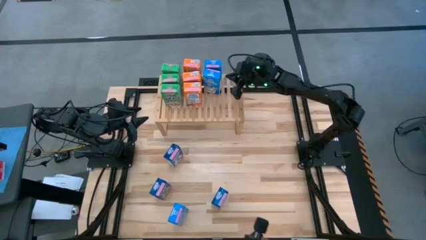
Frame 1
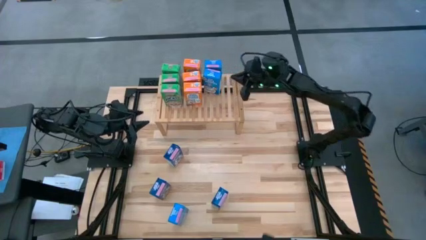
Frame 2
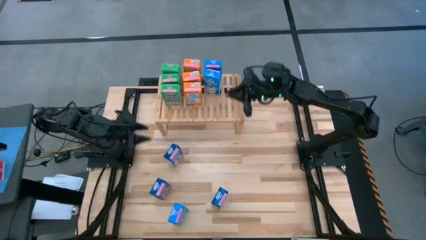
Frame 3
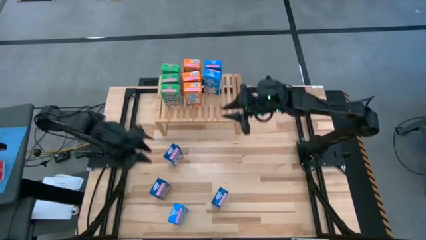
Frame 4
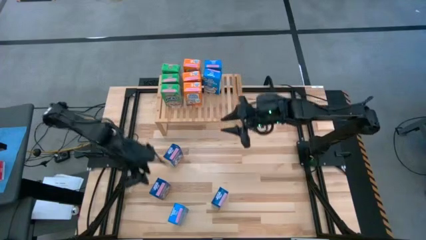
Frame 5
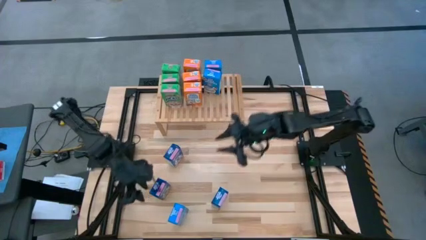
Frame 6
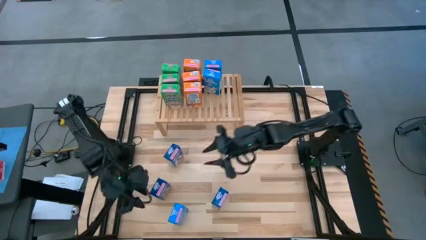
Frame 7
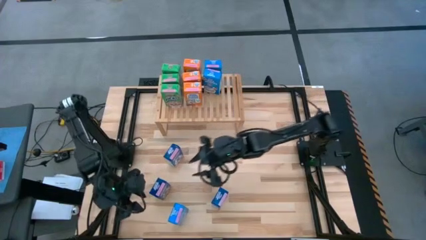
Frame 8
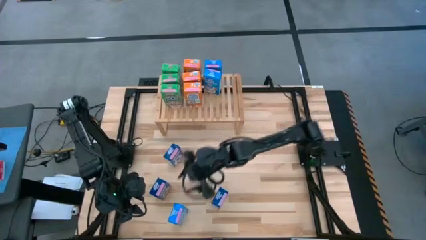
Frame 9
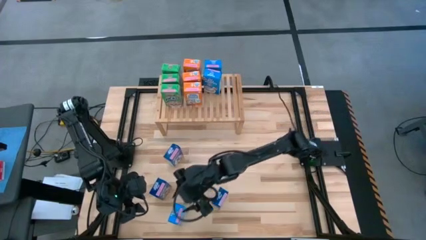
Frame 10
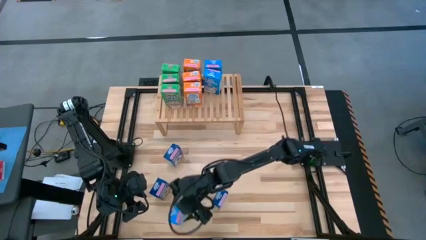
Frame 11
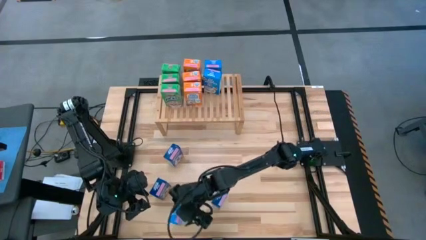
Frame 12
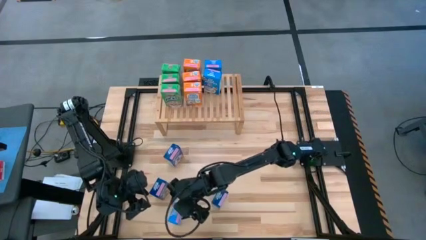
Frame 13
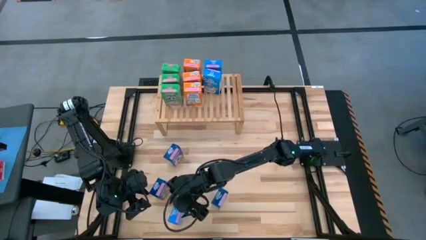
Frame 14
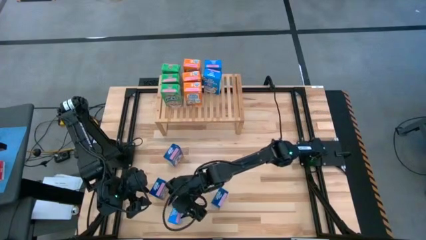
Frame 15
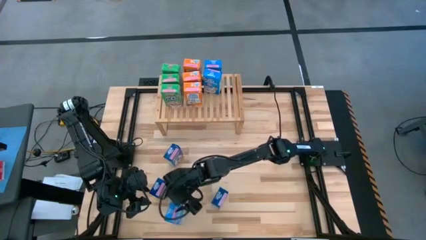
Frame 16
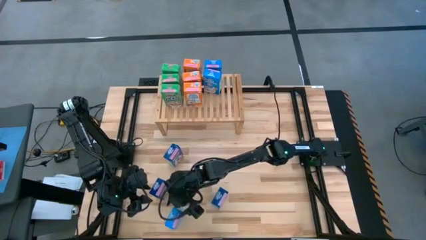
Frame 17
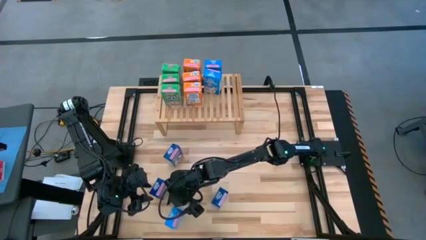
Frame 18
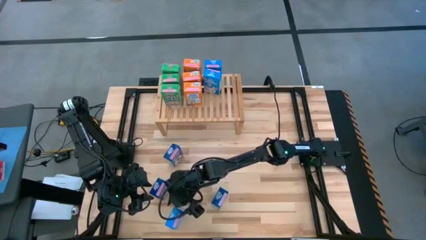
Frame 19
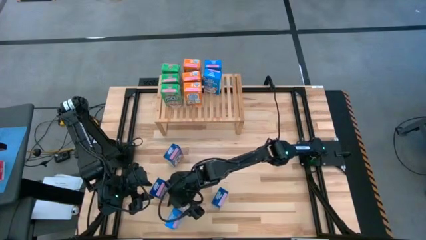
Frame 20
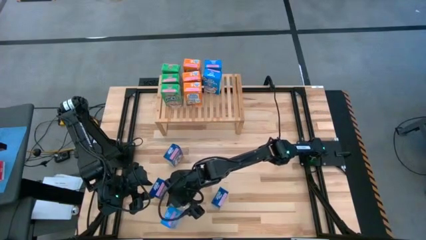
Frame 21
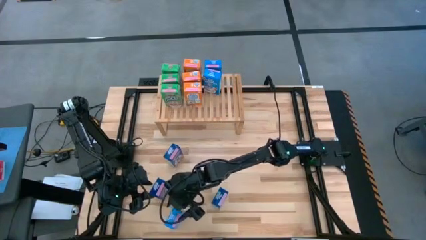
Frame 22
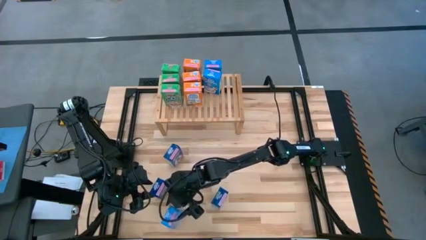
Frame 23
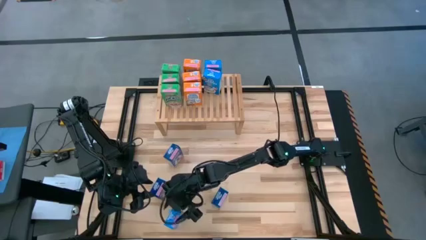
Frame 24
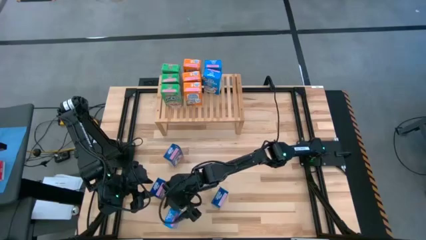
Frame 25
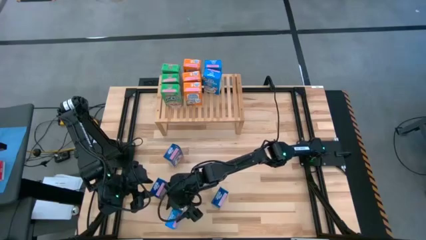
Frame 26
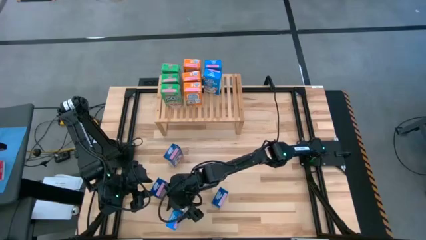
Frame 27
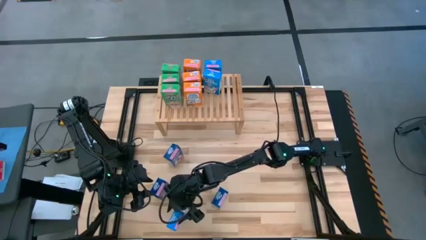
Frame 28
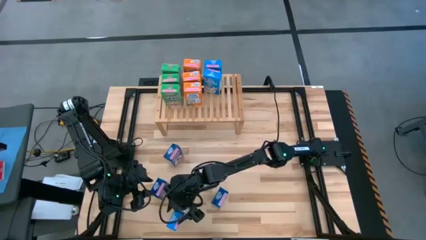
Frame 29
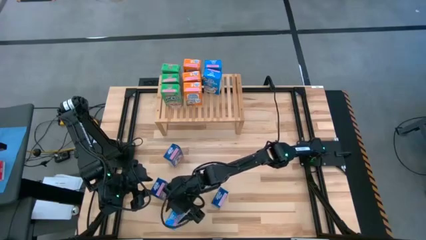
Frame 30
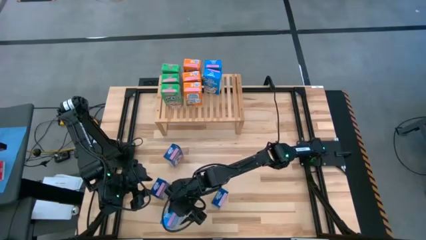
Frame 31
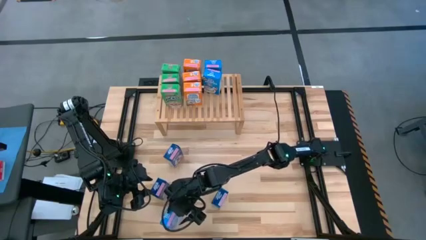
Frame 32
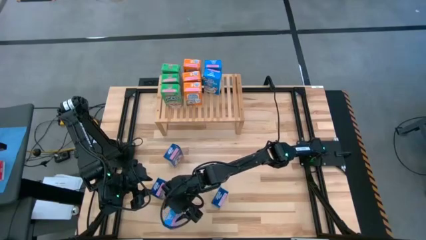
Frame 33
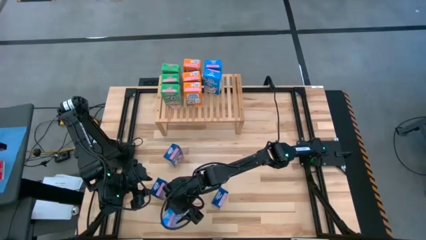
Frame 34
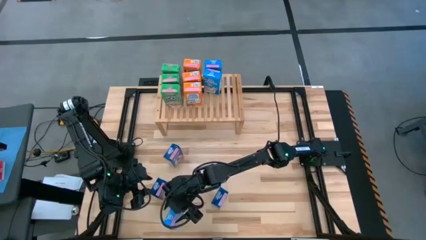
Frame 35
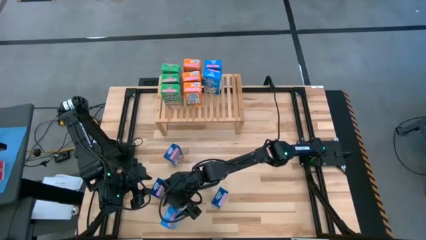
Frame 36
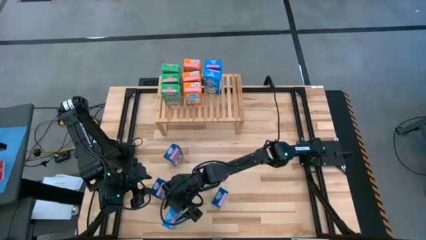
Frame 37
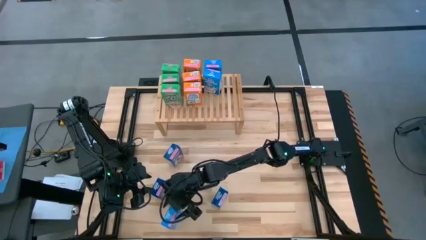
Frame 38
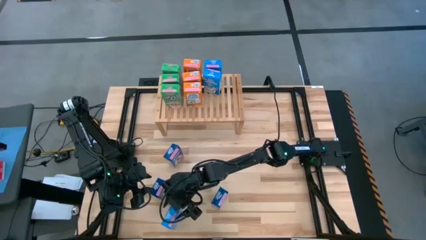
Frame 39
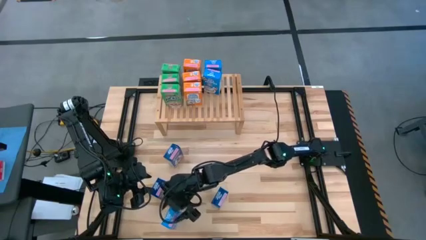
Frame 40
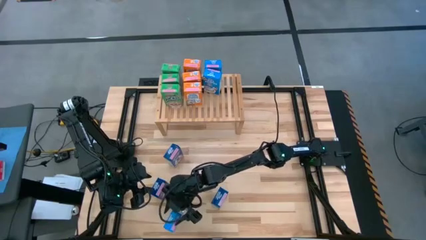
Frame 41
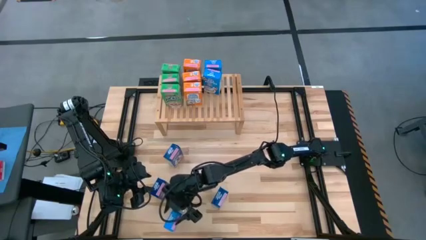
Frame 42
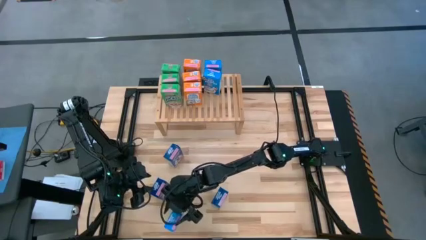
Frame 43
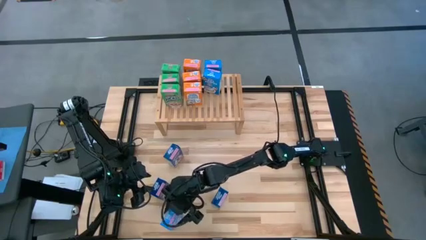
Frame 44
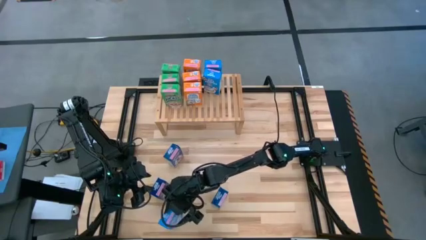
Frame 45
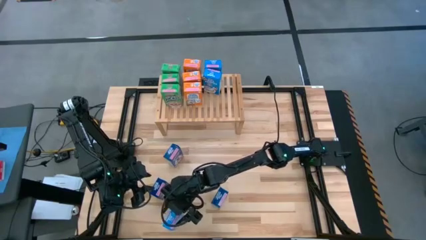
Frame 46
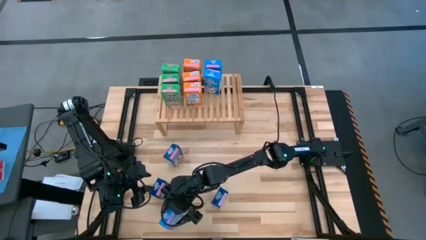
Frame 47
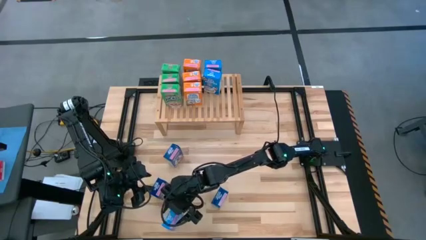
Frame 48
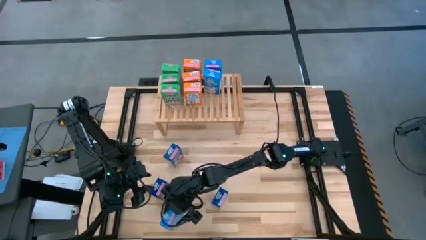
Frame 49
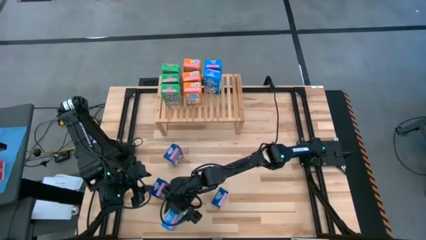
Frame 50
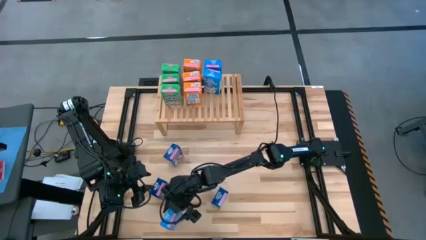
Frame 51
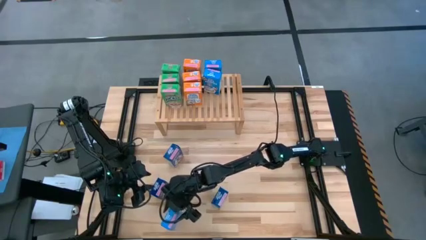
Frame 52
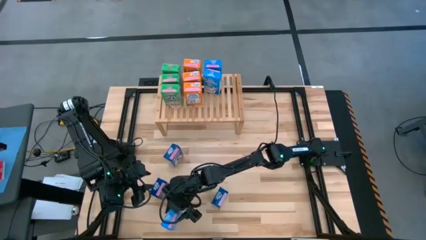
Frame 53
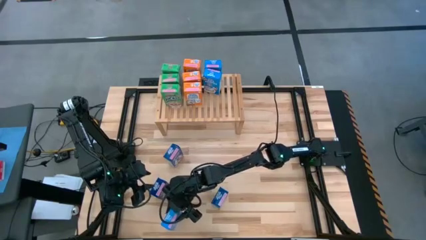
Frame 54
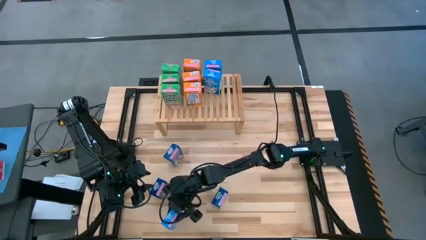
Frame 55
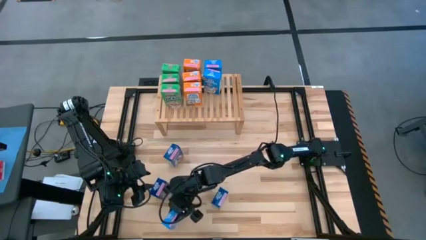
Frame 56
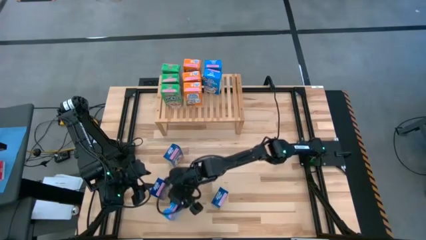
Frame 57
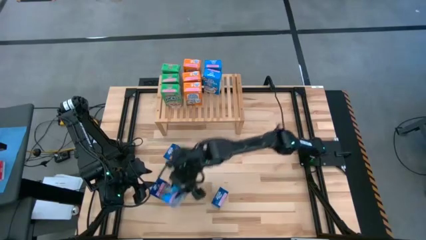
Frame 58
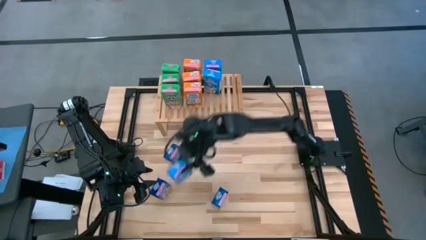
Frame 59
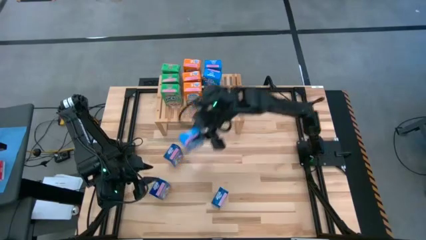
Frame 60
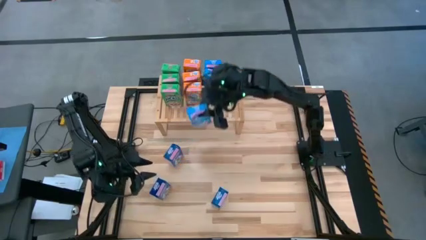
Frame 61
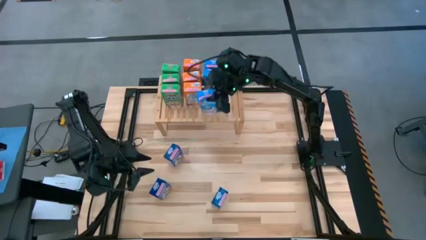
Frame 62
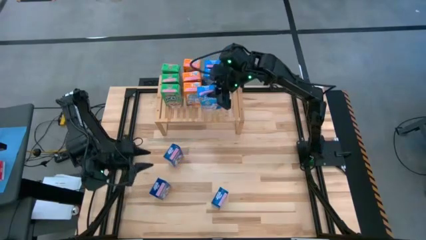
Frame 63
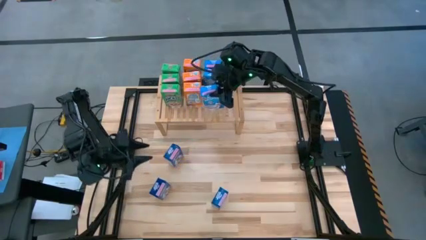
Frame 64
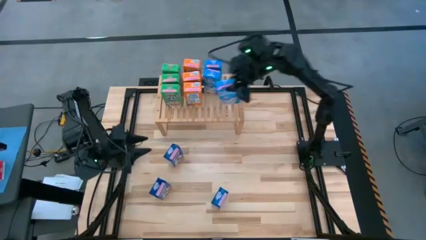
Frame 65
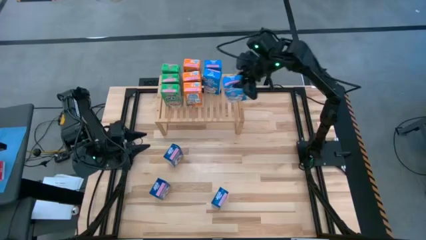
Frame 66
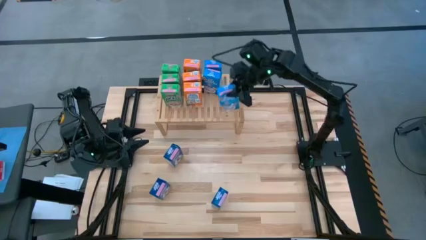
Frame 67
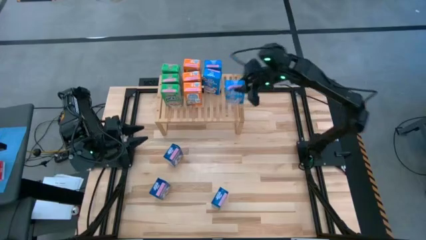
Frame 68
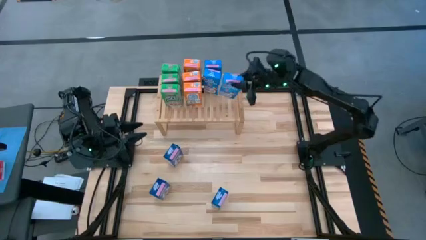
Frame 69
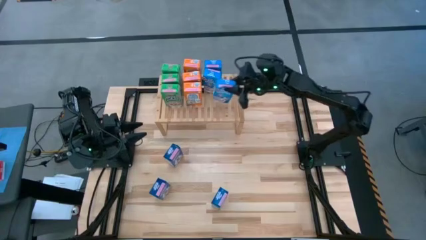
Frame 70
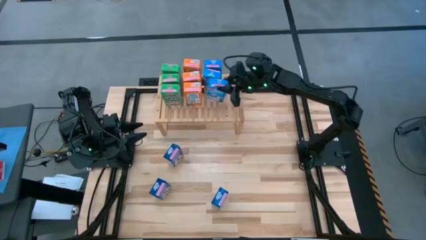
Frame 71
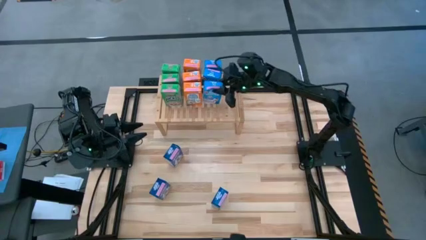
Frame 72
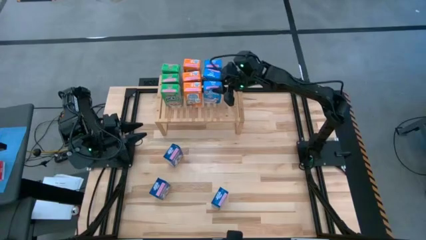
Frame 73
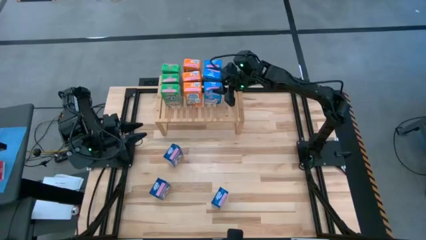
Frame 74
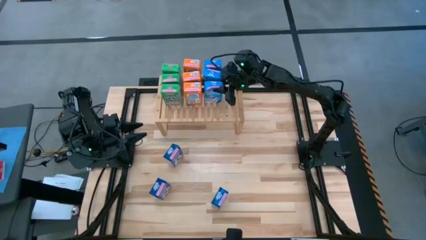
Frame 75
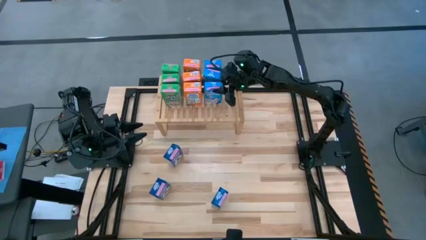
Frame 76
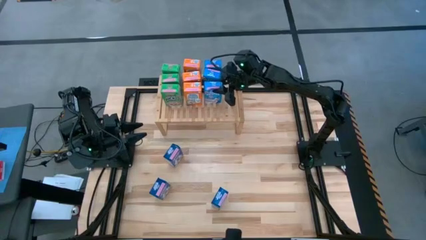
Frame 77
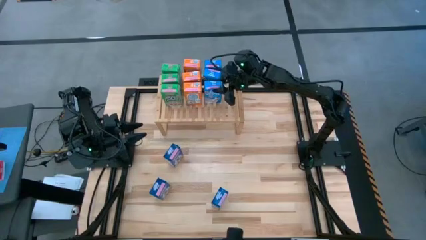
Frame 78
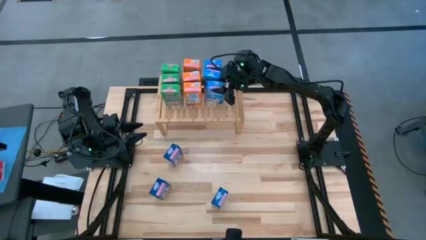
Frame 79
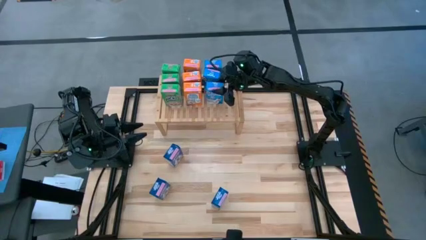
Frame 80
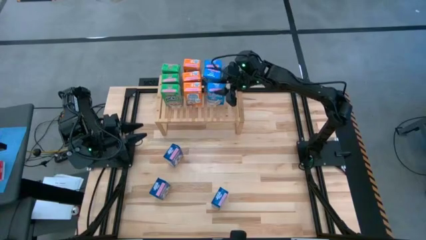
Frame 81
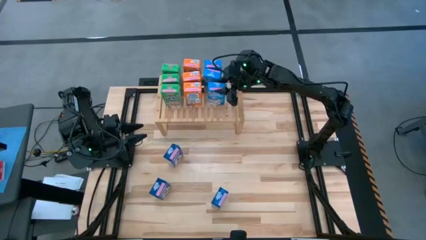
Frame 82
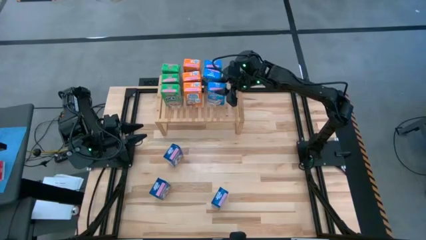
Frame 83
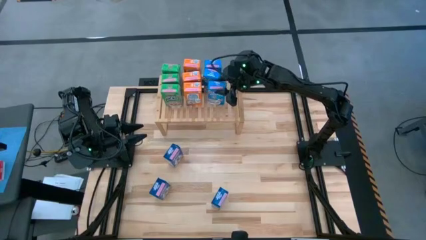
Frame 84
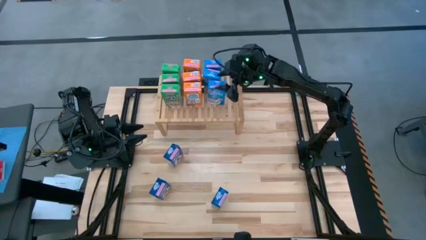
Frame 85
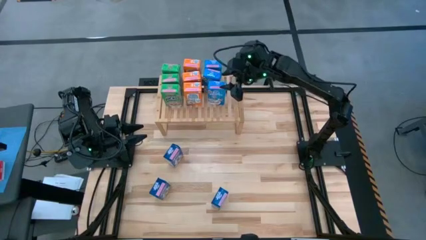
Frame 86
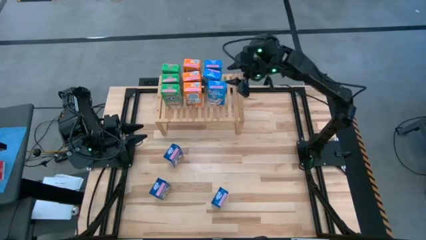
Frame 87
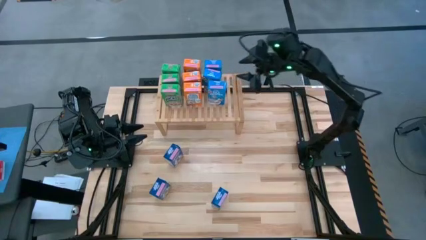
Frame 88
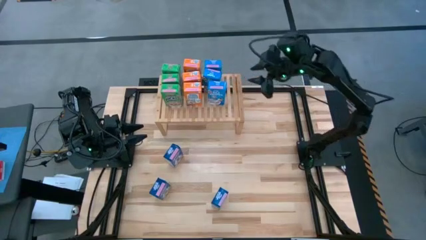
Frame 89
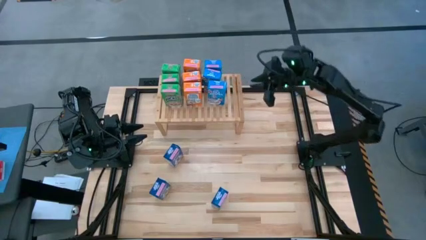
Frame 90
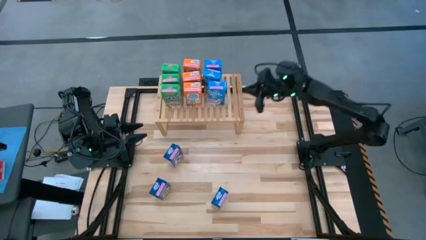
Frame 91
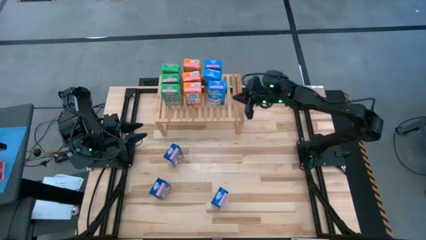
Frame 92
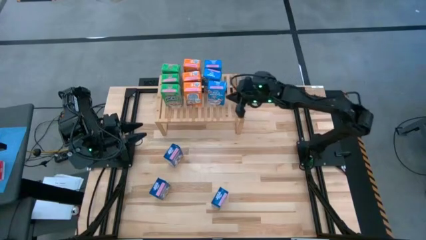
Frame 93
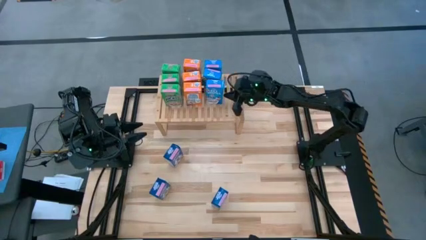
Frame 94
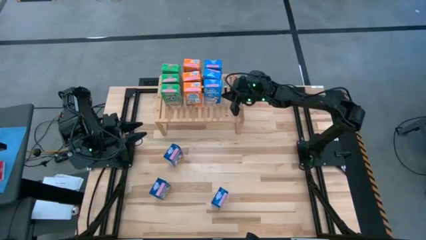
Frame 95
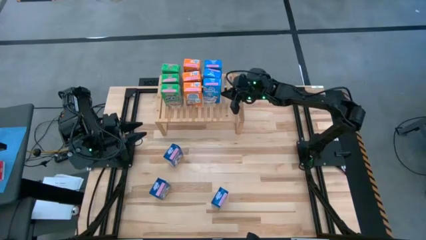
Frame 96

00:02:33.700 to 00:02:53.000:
Task: Stack cereal on shelf
Put the light blue cereal box on the shelf aligned with the other light blue cereal boxes
